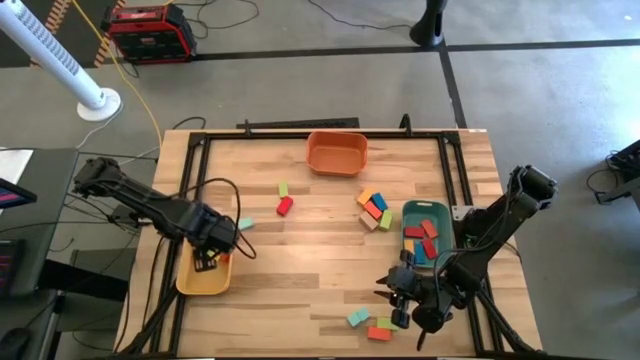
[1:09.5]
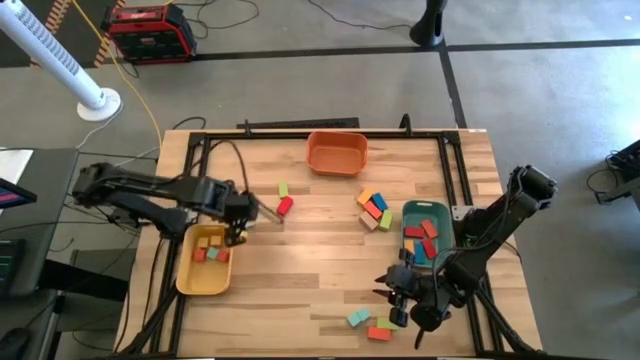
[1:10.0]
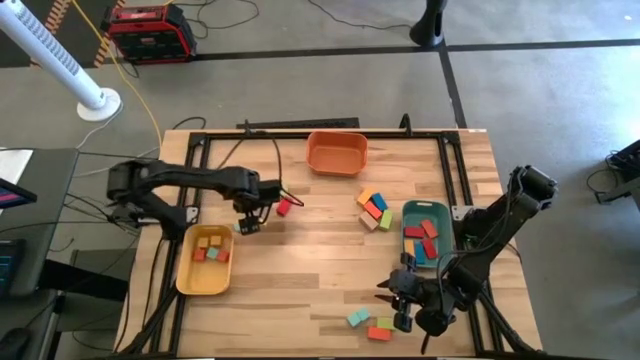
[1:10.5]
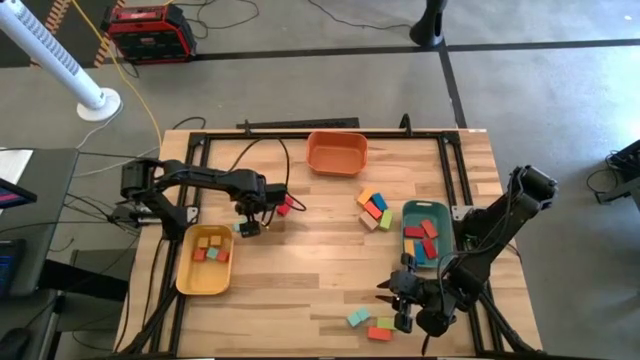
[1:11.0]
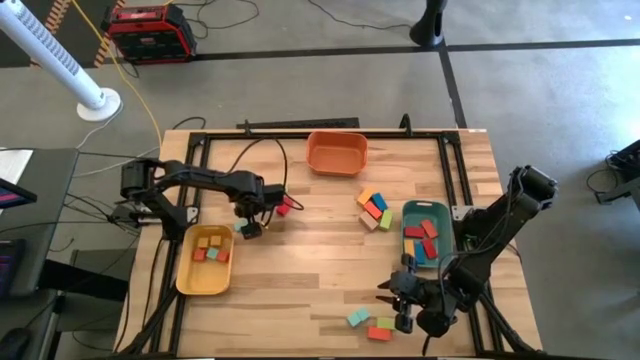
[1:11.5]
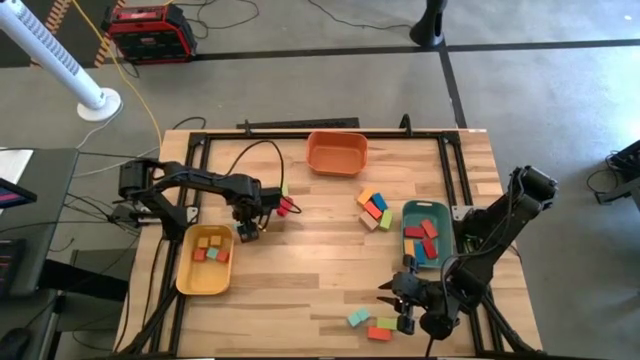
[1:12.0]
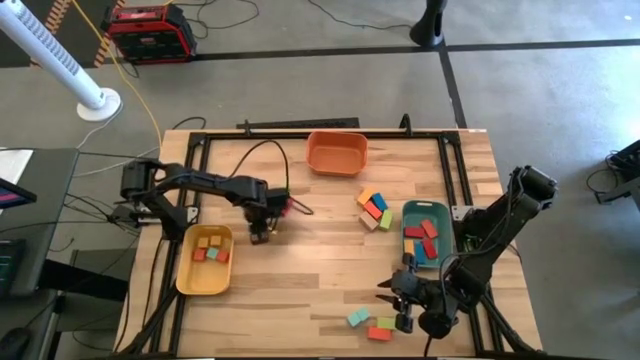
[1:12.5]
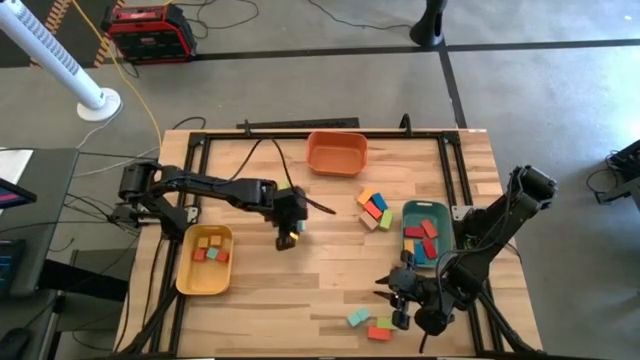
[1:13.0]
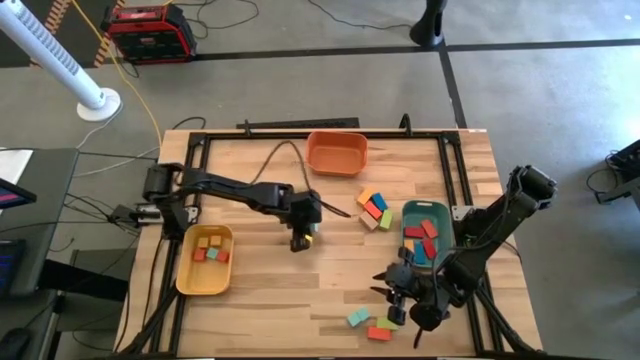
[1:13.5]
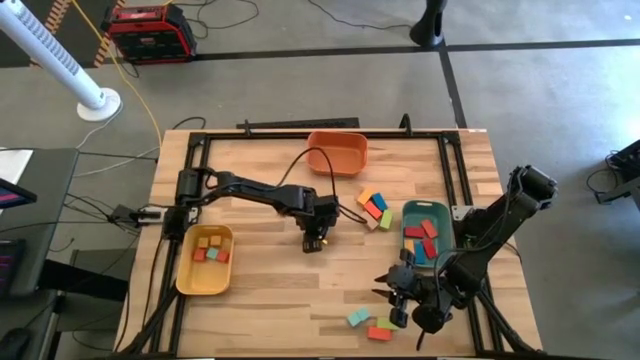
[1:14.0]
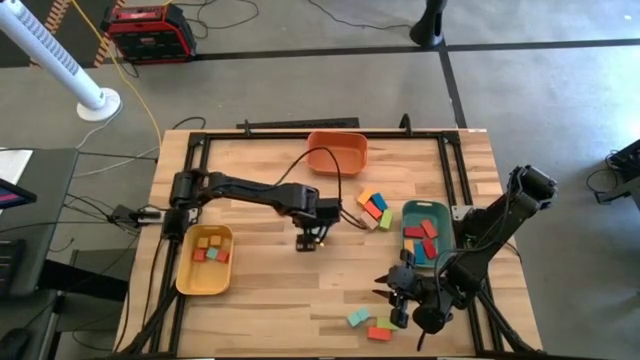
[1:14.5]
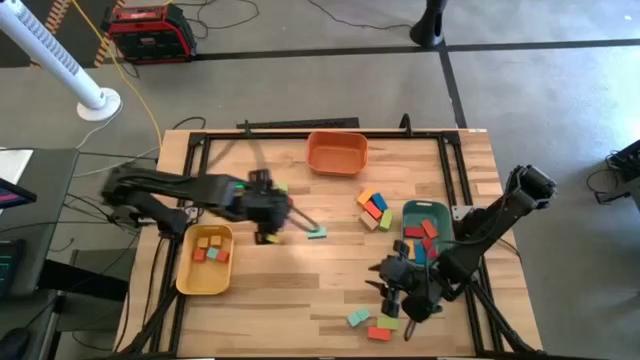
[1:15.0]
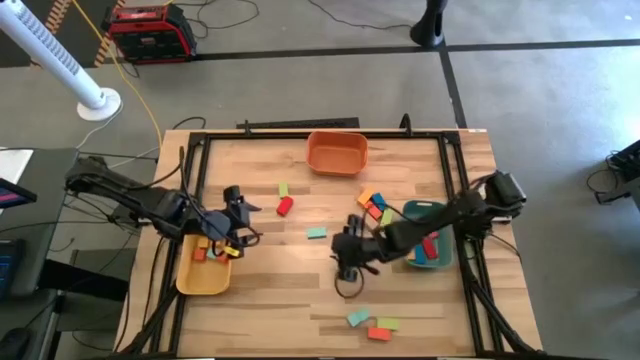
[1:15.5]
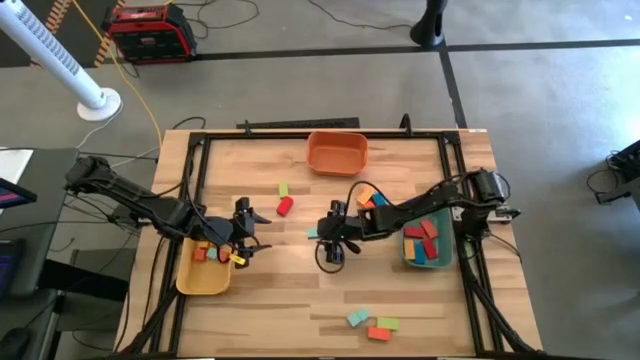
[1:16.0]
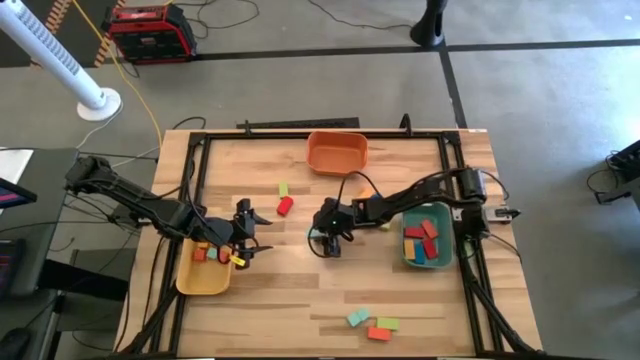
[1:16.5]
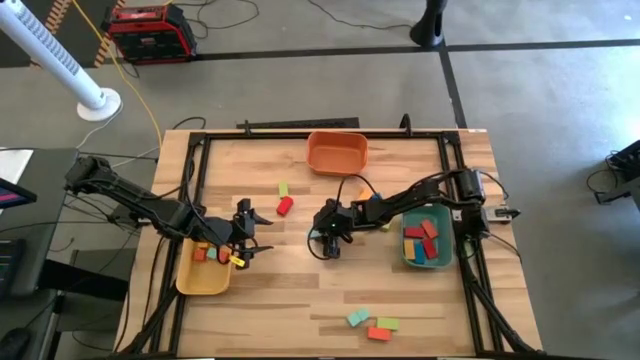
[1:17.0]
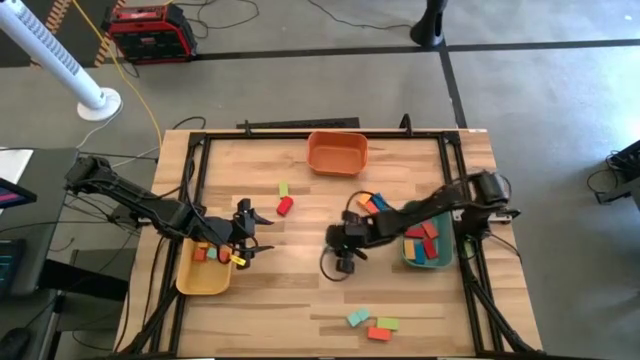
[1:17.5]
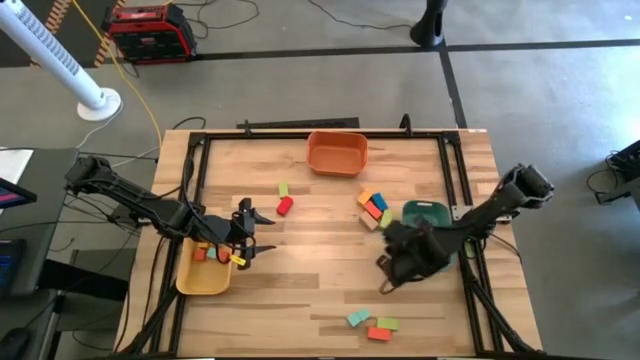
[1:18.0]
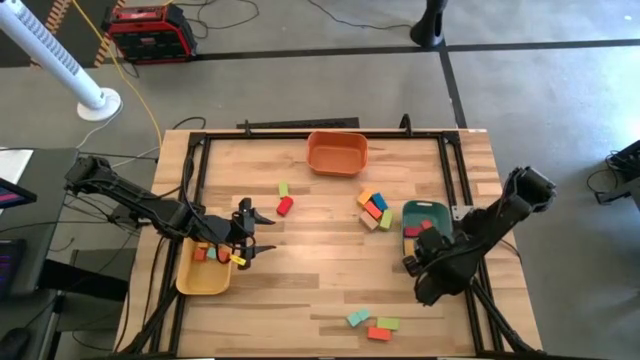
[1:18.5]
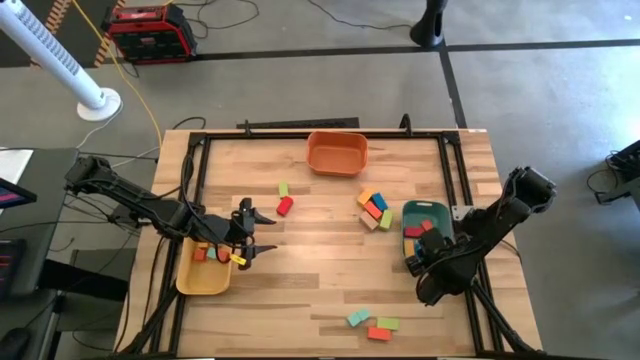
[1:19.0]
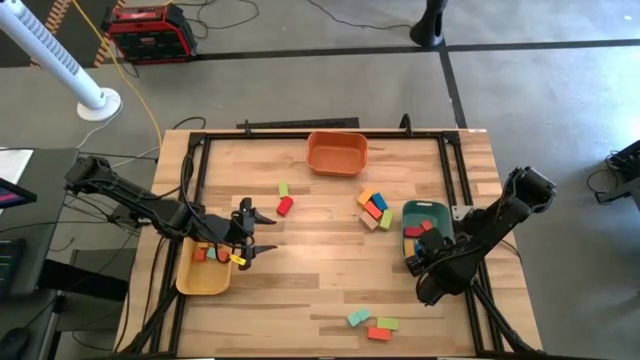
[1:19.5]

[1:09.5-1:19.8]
Task: Sort blocks by size
Put the medium light blue block into the green bin

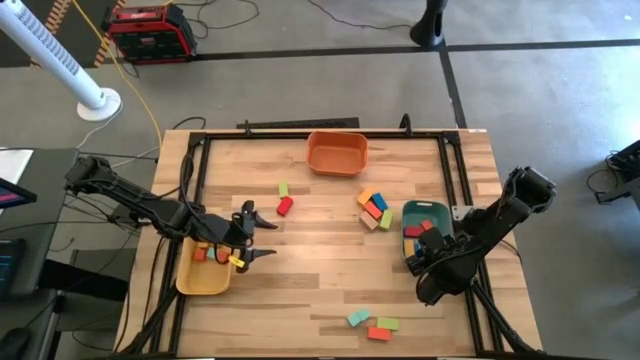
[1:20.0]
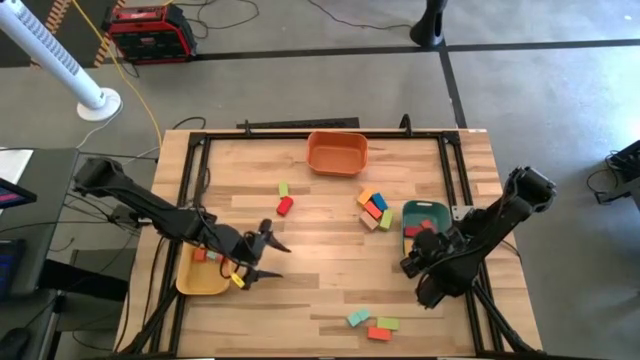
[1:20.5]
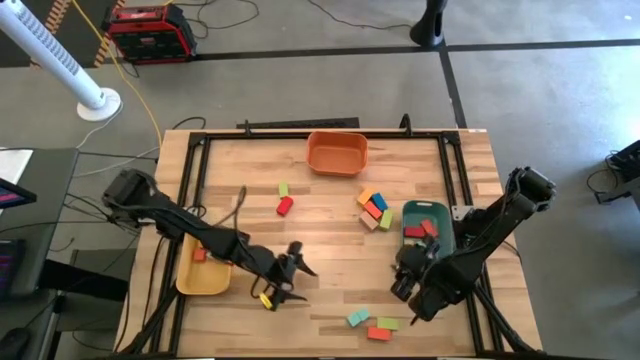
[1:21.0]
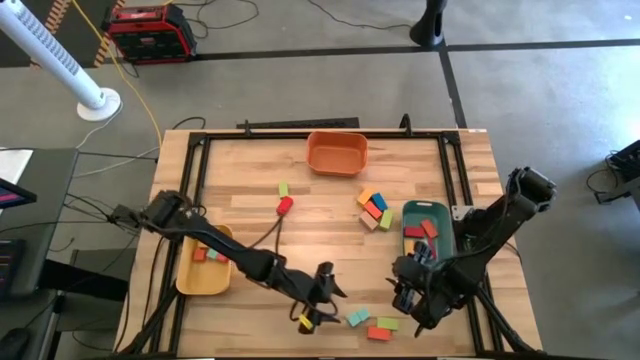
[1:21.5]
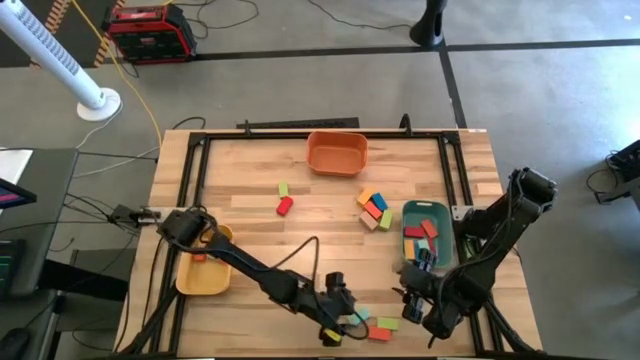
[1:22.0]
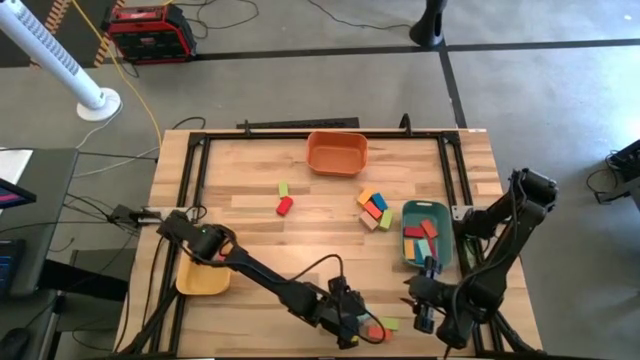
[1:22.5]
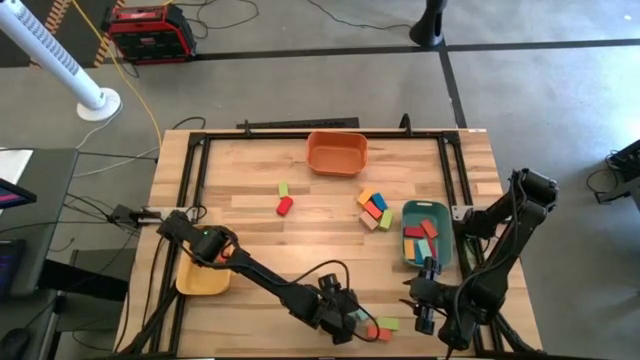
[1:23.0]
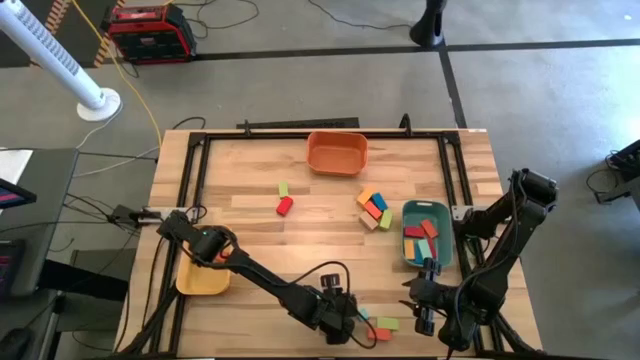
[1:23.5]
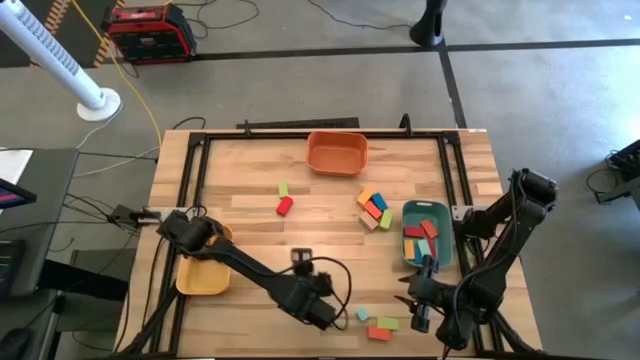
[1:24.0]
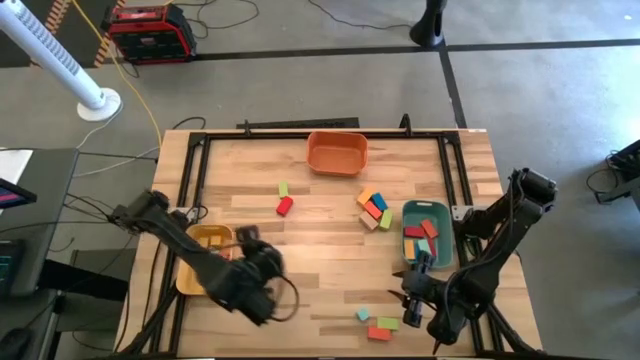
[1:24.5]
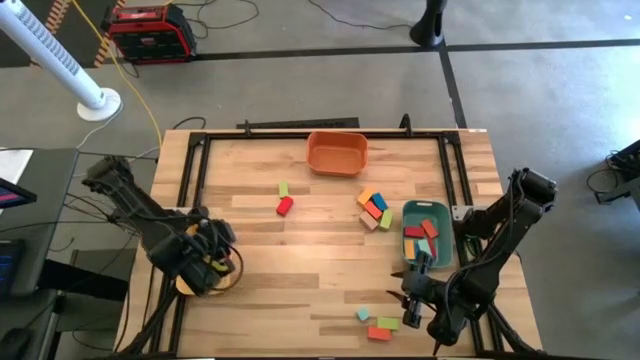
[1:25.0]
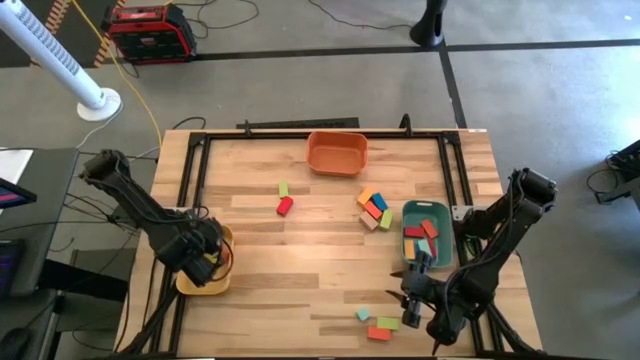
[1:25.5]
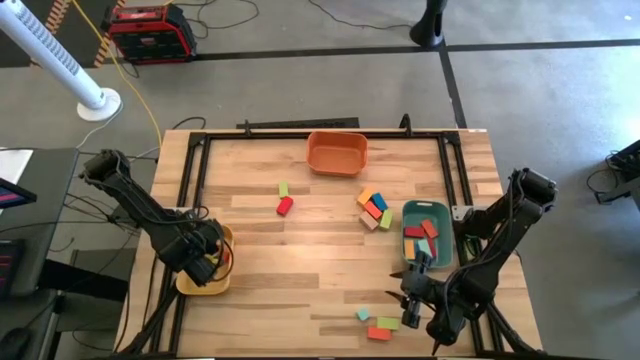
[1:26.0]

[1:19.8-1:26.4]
Put the small light blue block into the yellow bin

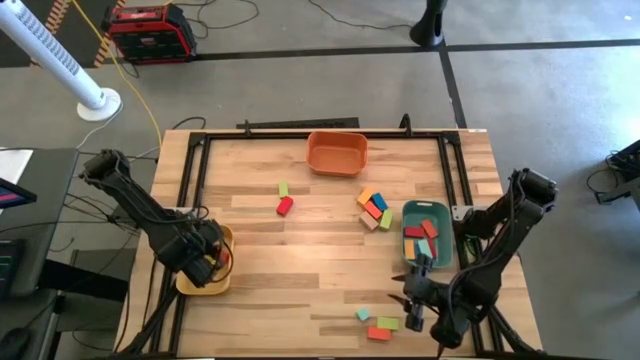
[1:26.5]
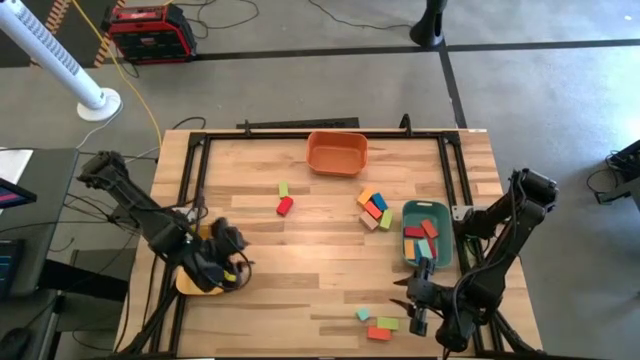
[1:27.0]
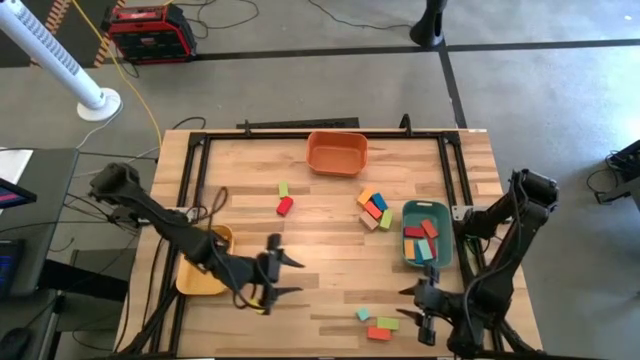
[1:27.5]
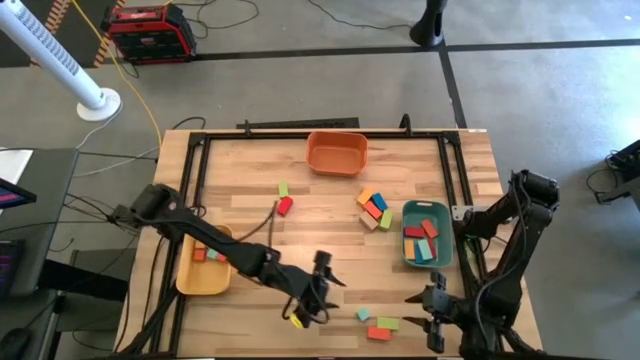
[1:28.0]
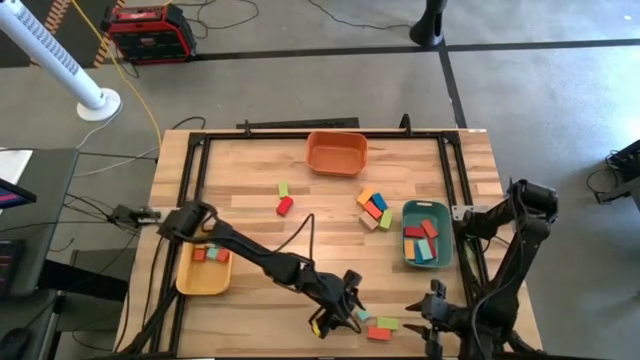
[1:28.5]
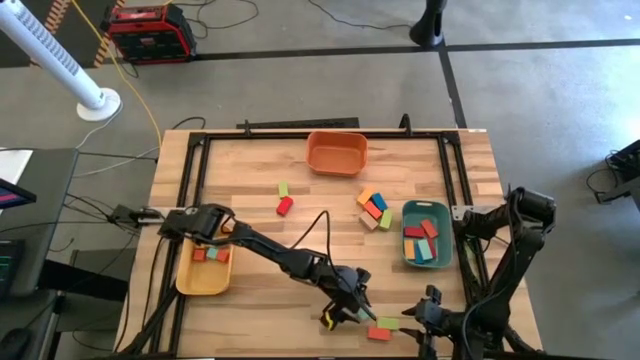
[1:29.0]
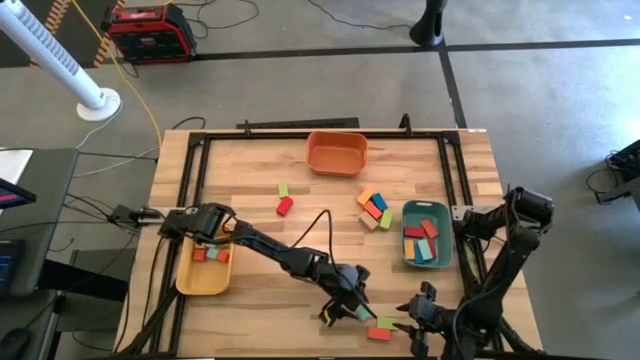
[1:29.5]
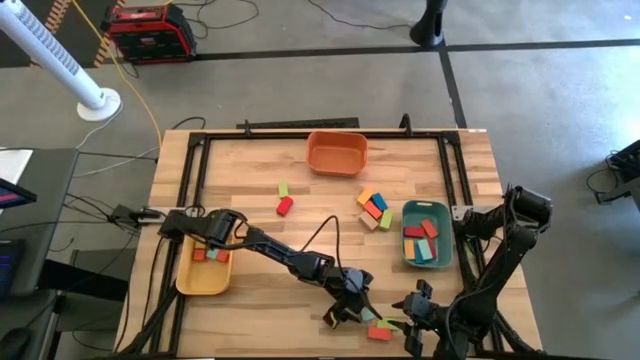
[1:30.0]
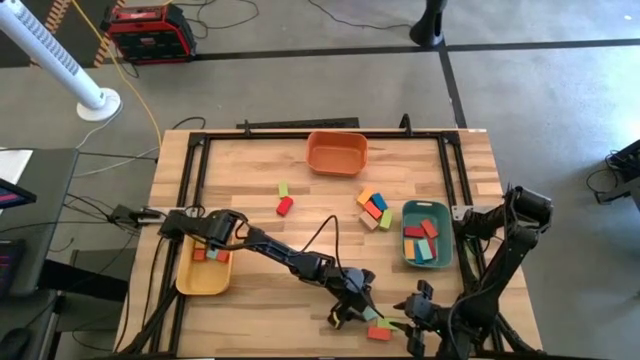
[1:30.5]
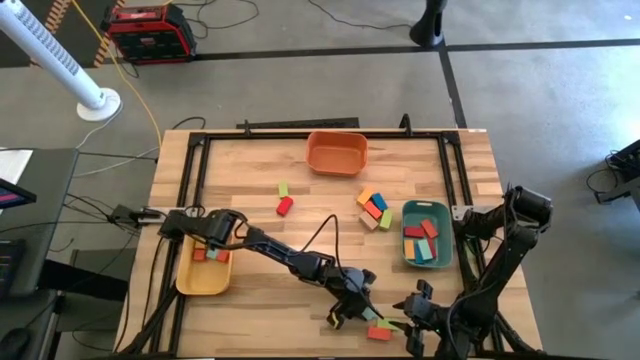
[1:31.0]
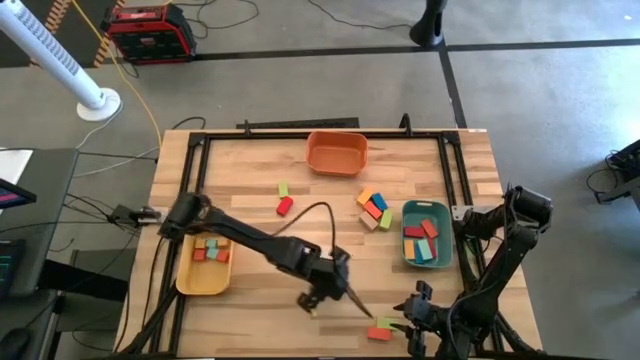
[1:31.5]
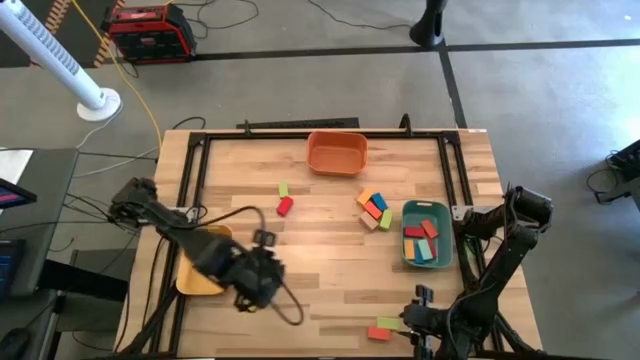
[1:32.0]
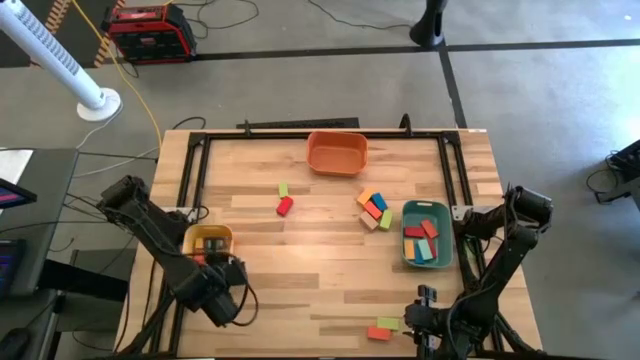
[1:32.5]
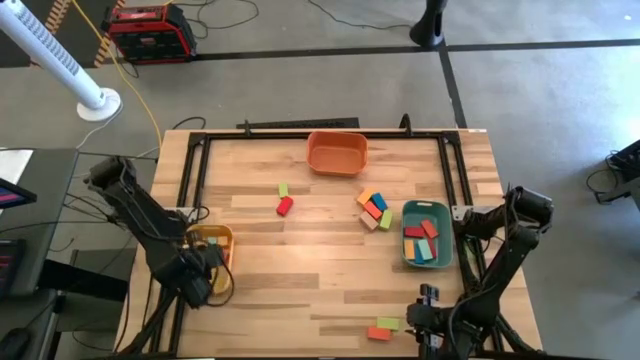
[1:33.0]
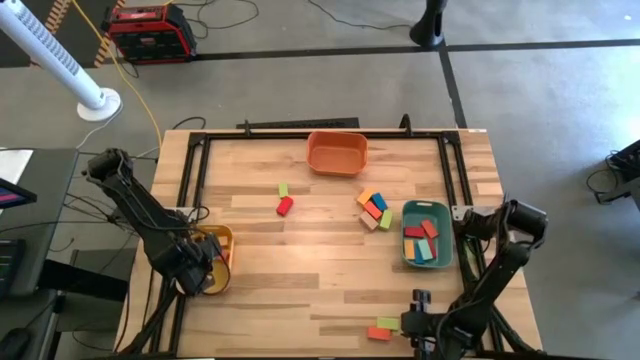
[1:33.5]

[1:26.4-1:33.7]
Put the small light blue block into the yellow bin
